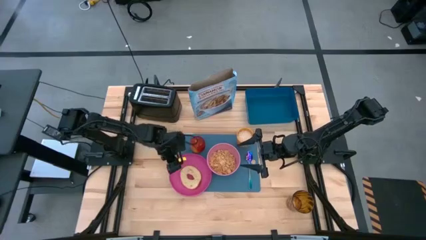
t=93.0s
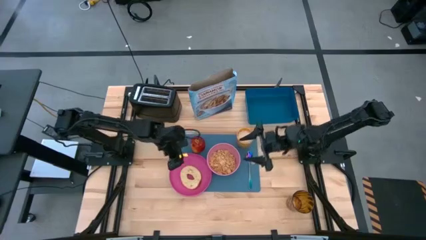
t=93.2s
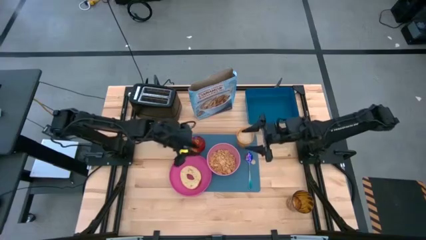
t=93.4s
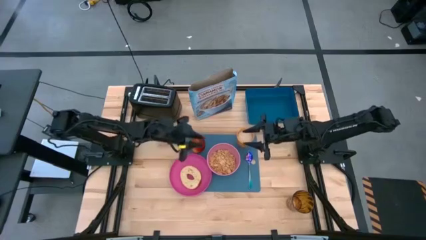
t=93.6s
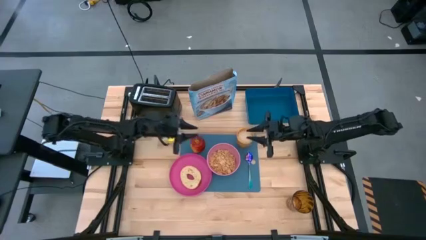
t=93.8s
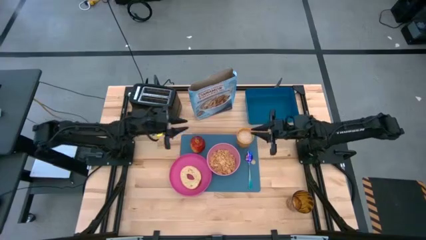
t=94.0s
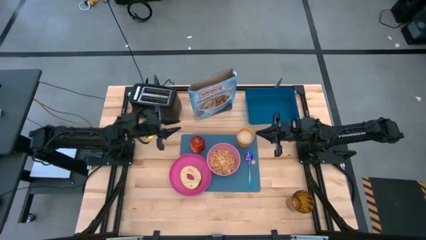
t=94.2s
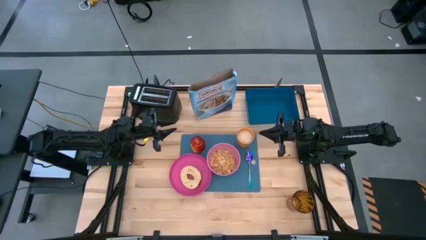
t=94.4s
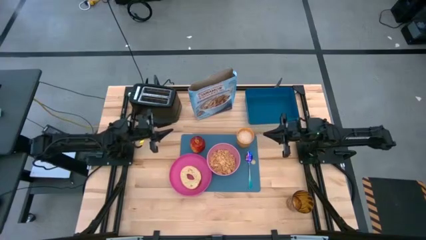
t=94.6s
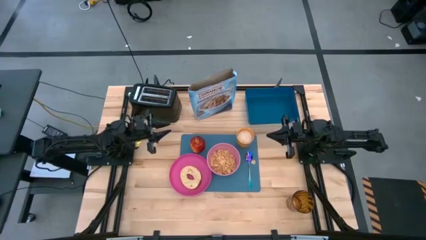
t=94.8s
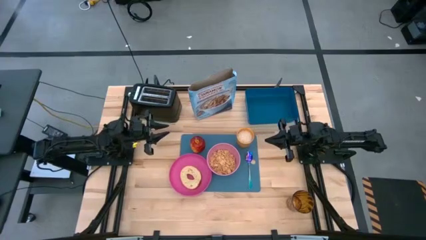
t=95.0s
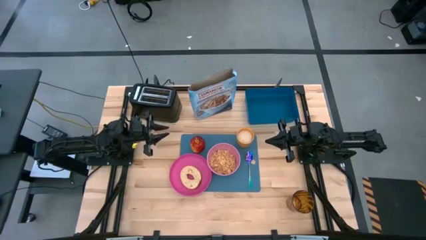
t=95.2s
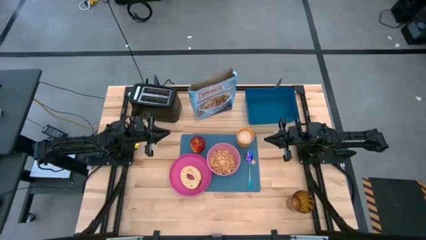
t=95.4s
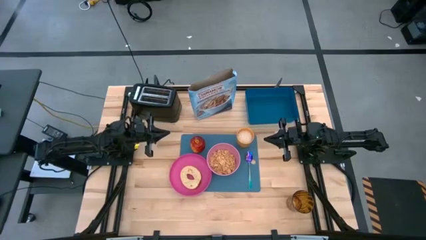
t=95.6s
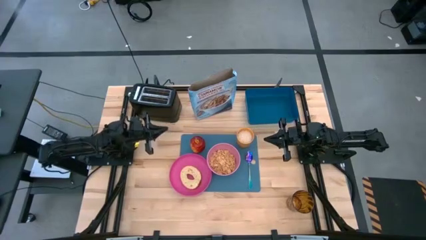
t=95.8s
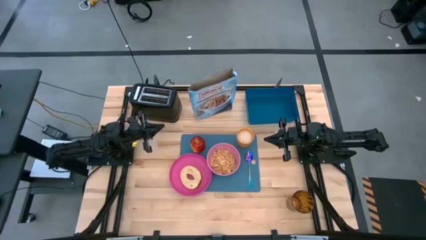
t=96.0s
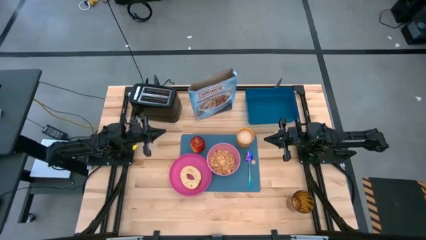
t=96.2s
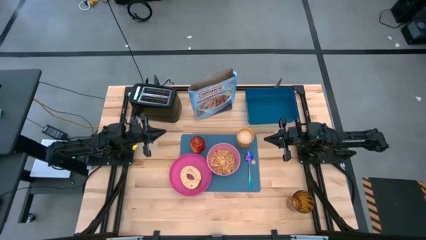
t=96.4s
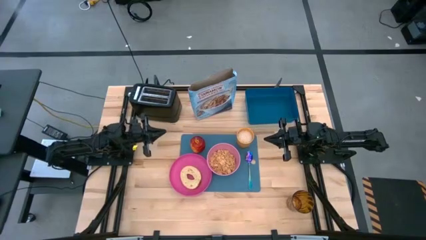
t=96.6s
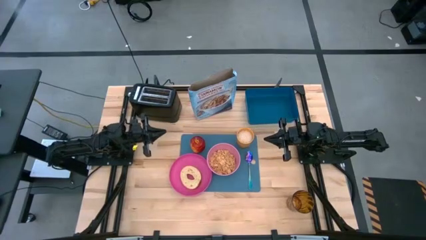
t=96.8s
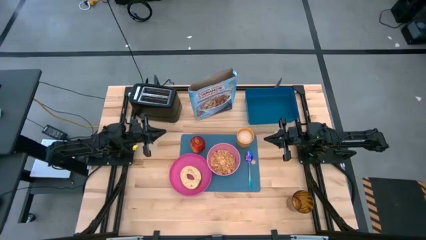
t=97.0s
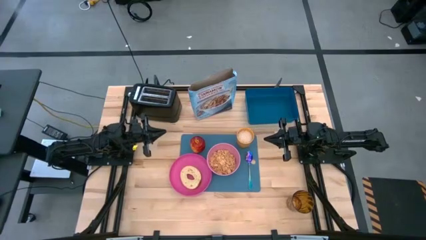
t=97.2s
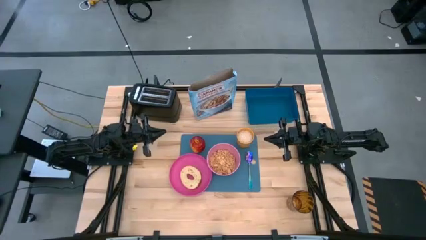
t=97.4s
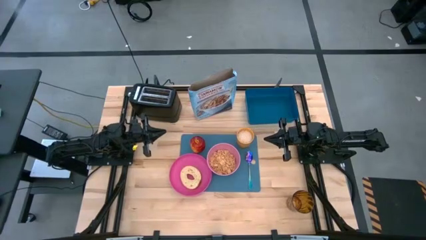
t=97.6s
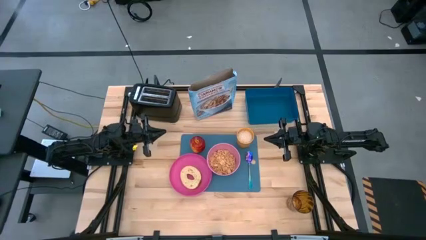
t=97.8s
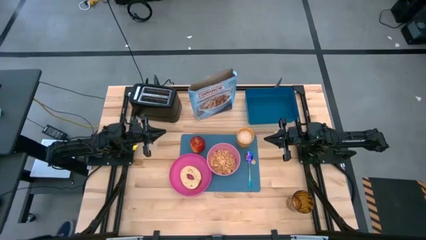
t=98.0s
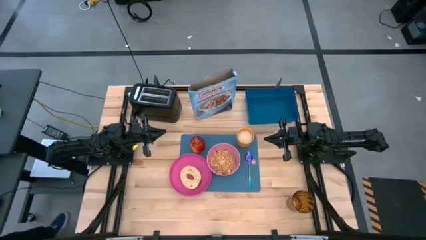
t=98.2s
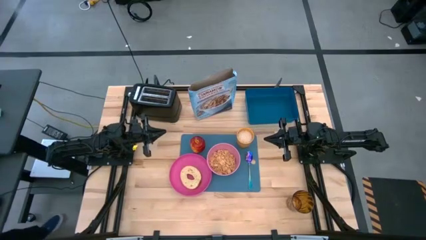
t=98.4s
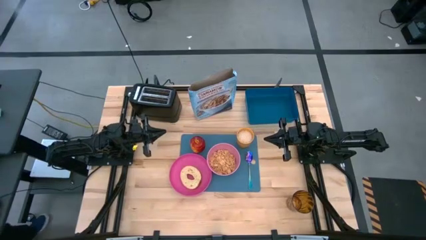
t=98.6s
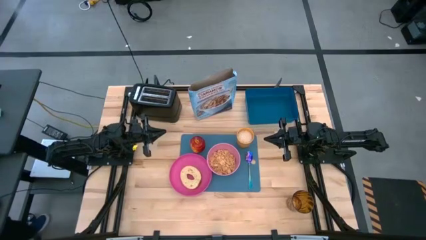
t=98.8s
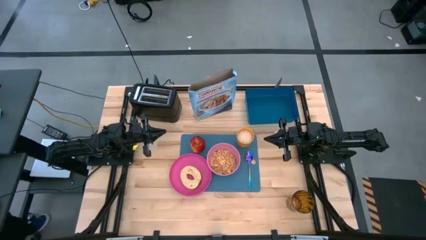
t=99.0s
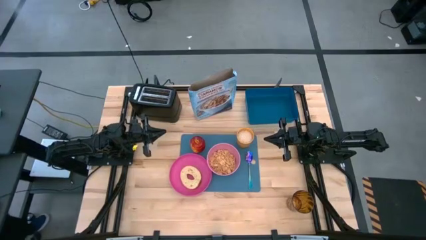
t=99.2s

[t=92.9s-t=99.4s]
Task: Arrange a breakfast setting
Return to Home Position

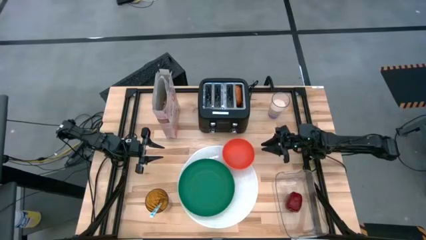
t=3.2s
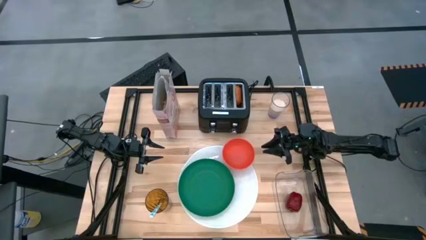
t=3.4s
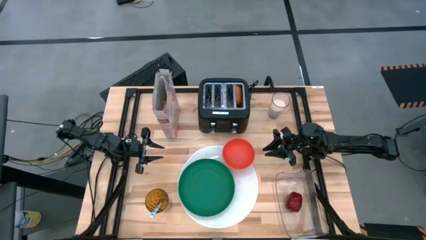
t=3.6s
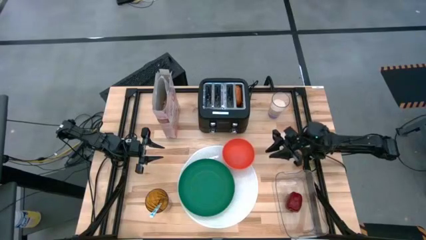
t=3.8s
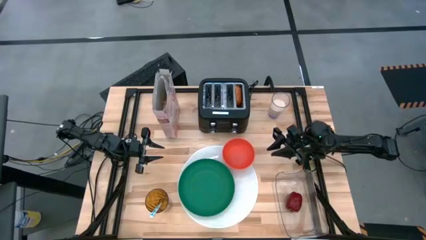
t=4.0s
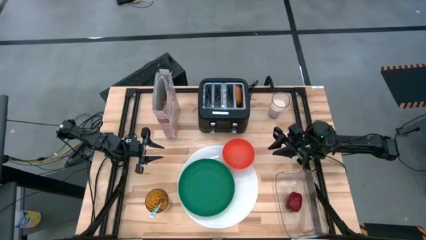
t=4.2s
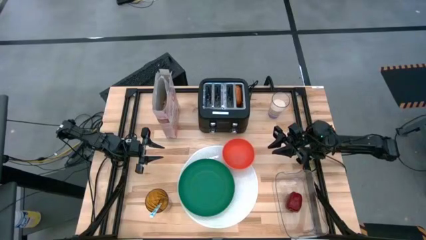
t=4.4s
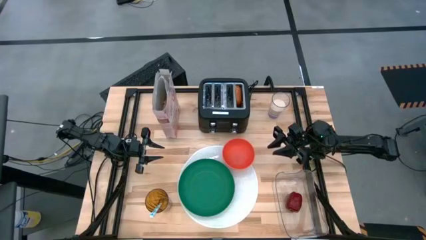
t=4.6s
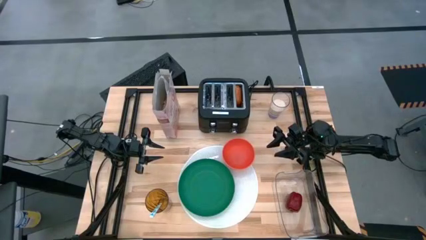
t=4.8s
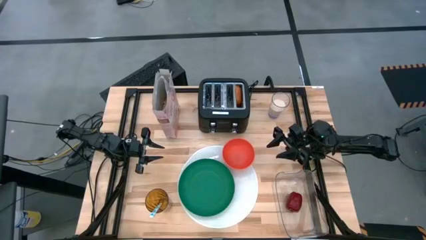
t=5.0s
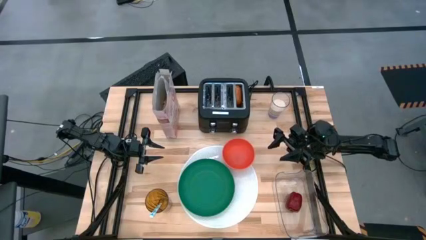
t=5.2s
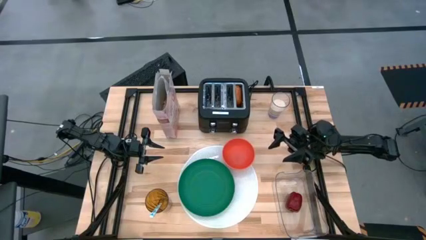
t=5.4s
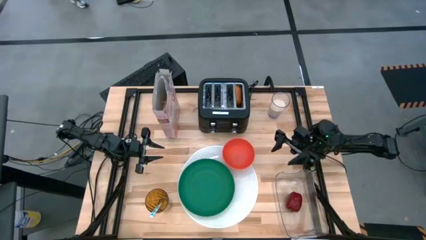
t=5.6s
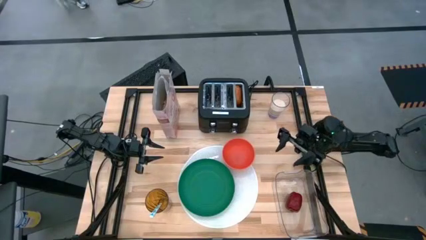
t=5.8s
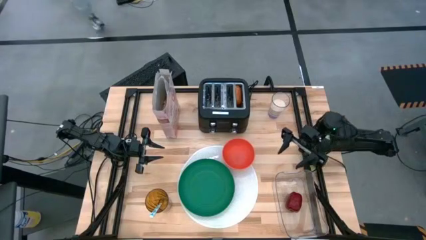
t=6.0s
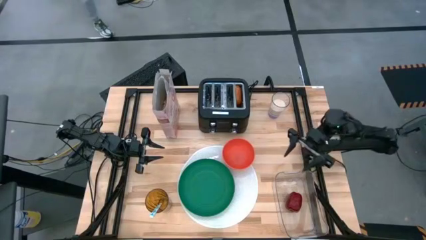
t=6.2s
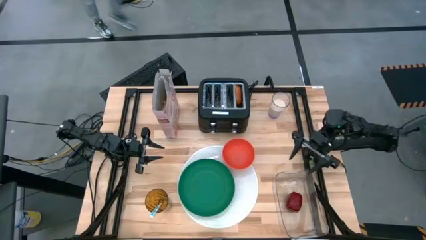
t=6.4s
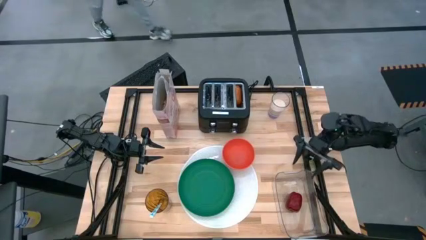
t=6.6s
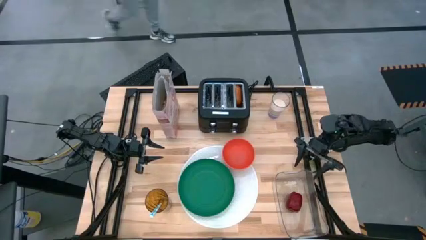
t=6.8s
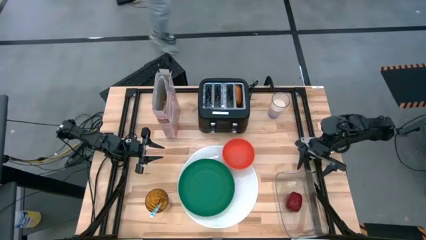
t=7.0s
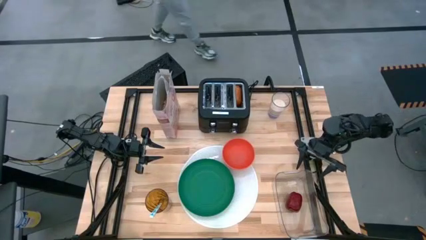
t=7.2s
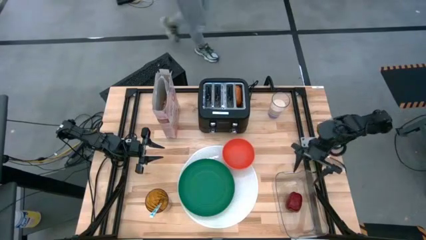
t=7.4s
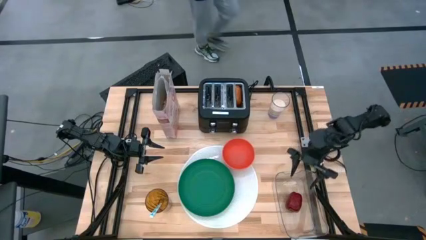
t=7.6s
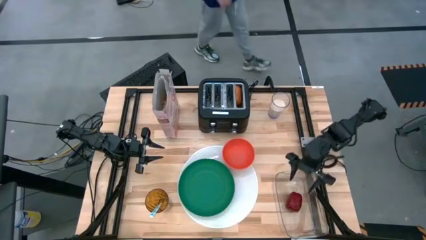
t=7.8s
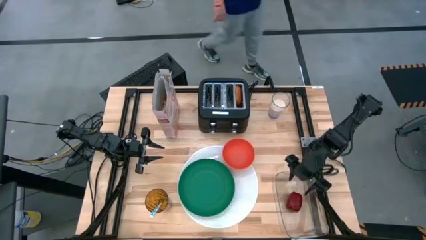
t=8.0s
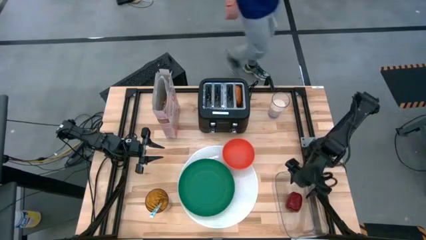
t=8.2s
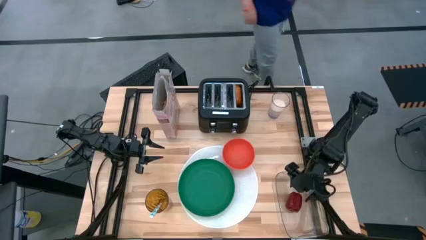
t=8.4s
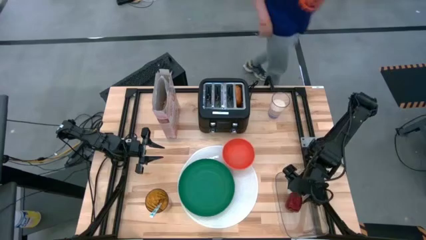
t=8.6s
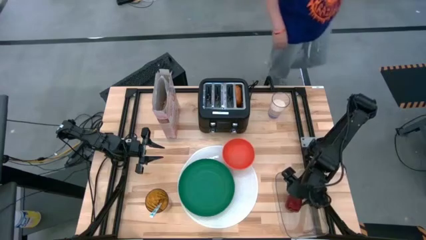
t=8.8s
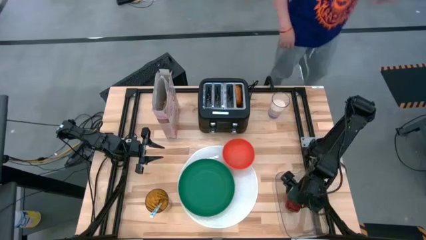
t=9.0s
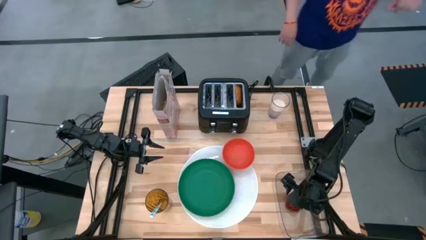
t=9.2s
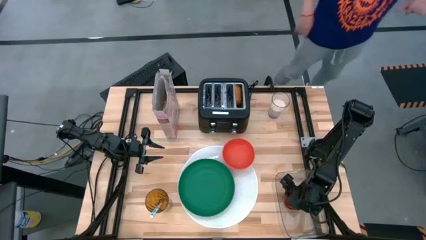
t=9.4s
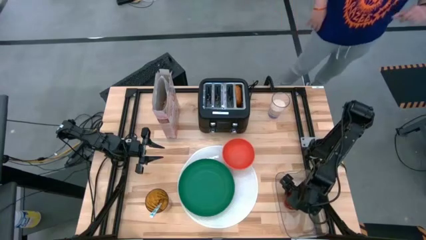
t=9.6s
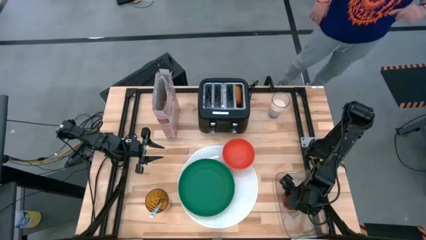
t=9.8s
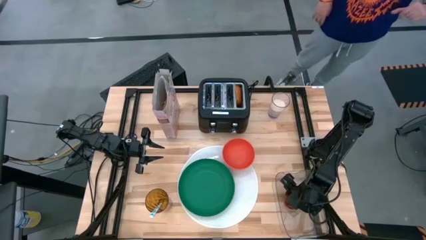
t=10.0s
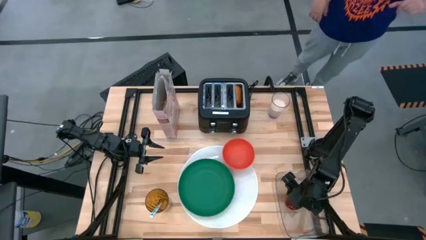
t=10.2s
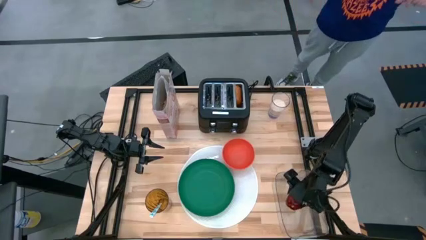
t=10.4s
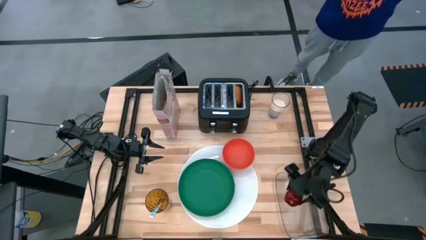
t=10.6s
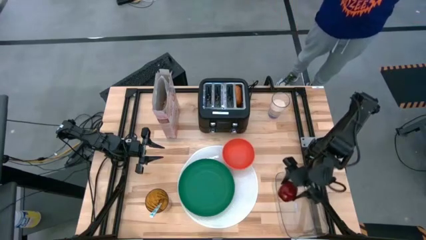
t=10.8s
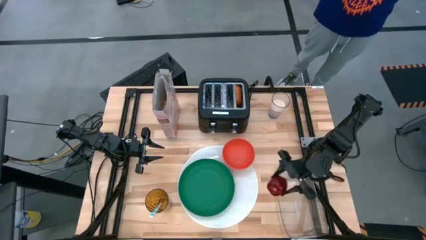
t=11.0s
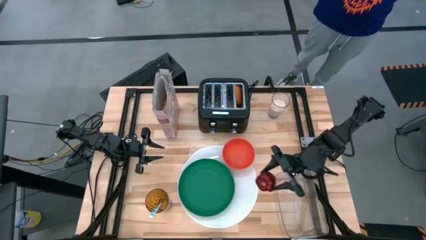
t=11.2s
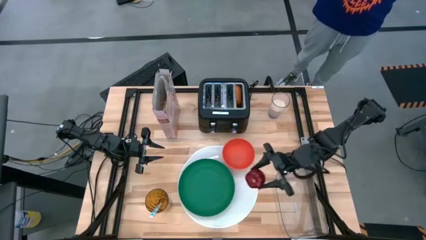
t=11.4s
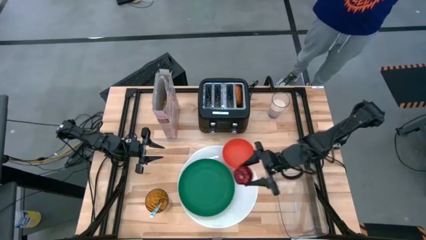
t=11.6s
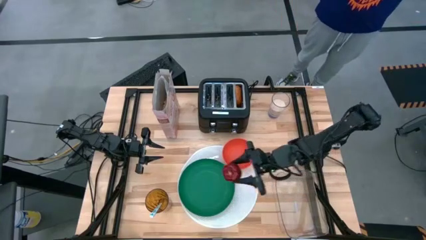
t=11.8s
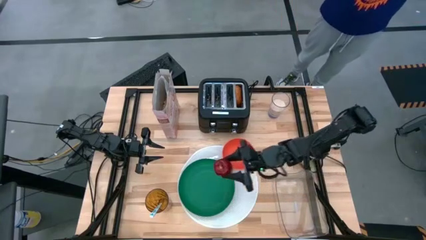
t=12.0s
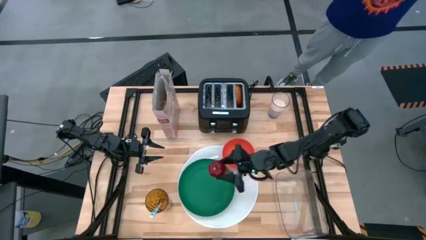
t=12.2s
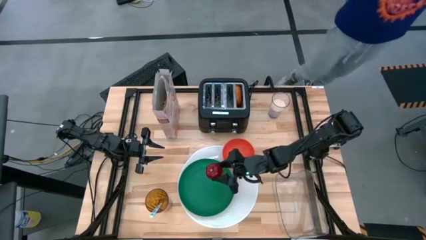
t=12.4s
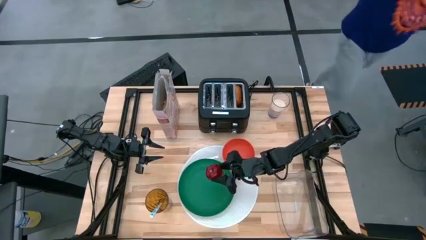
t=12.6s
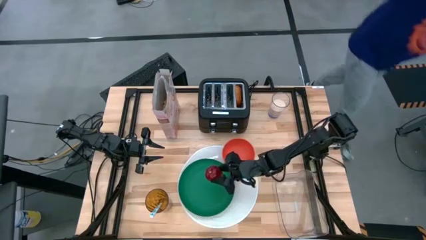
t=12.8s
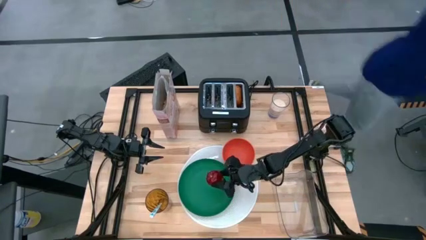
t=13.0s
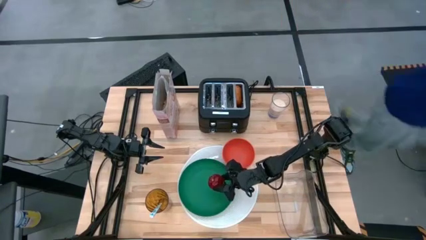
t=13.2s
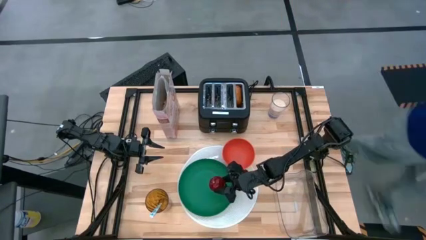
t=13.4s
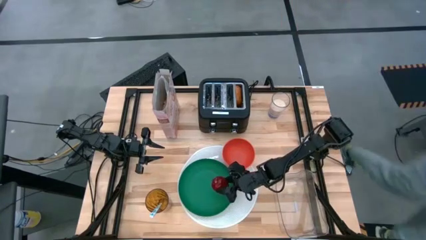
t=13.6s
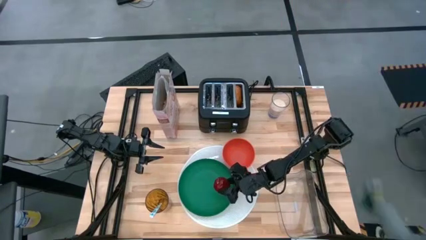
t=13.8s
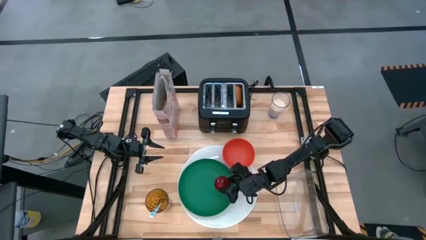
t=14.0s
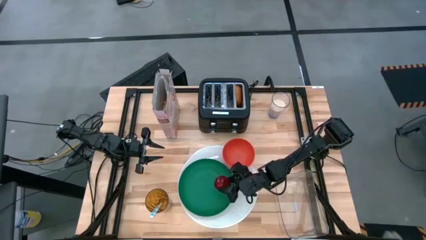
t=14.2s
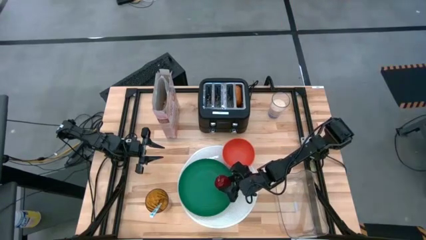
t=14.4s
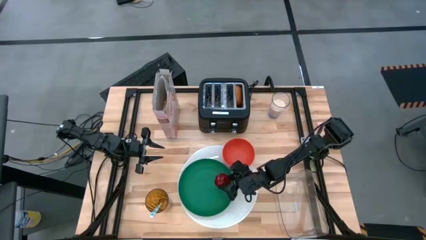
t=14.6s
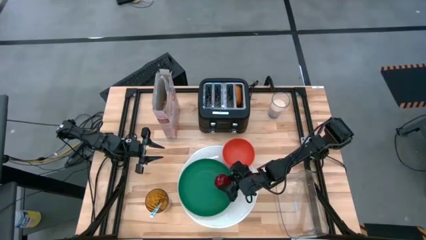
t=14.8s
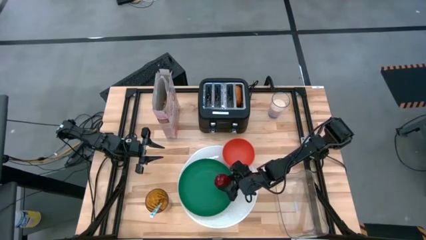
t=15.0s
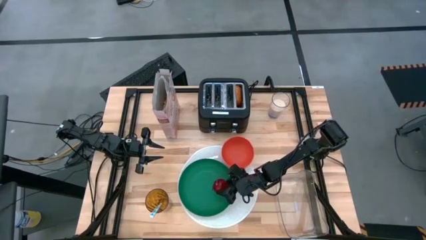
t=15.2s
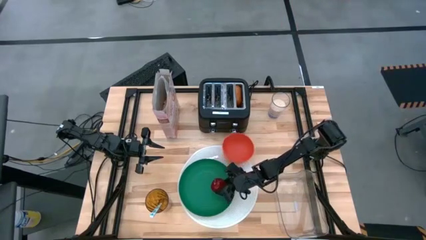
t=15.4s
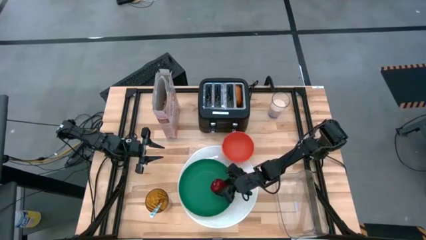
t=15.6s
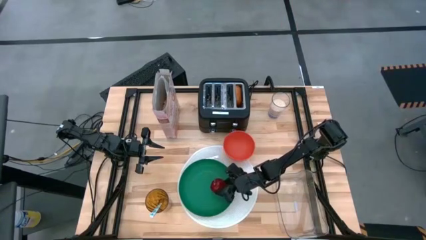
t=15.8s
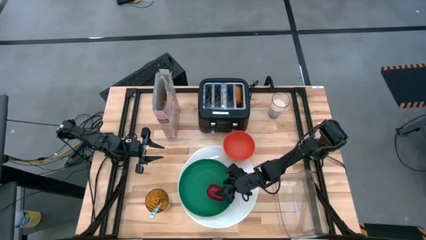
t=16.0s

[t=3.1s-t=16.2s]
Task: Arrange a breakfast setting
Put the red apple on the green plate from the transparent bin
